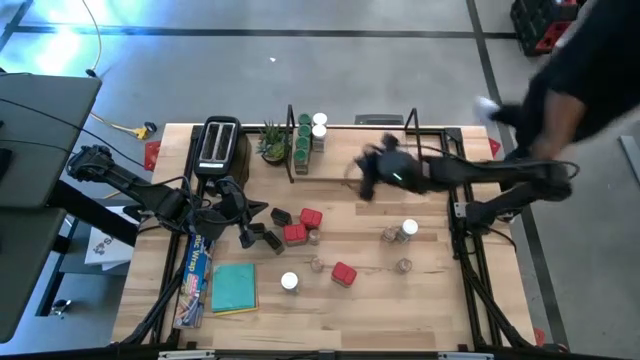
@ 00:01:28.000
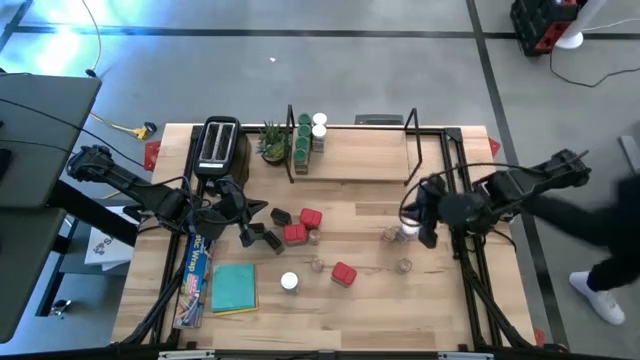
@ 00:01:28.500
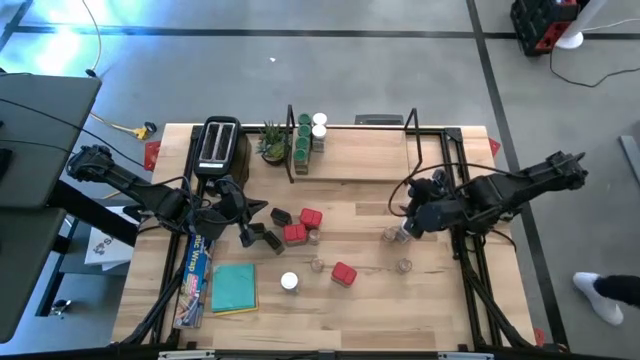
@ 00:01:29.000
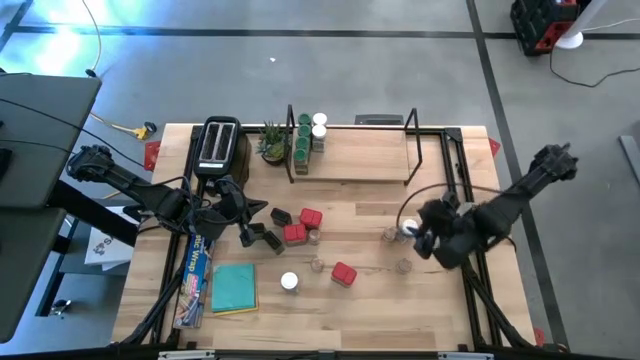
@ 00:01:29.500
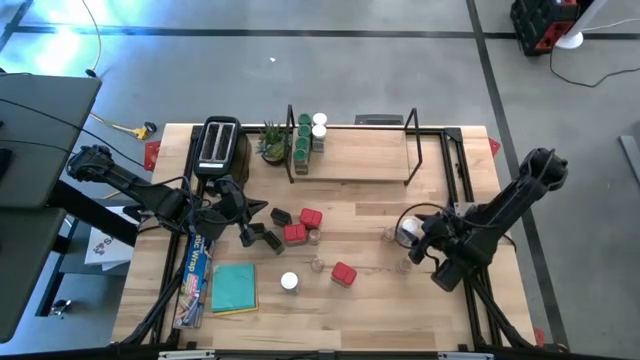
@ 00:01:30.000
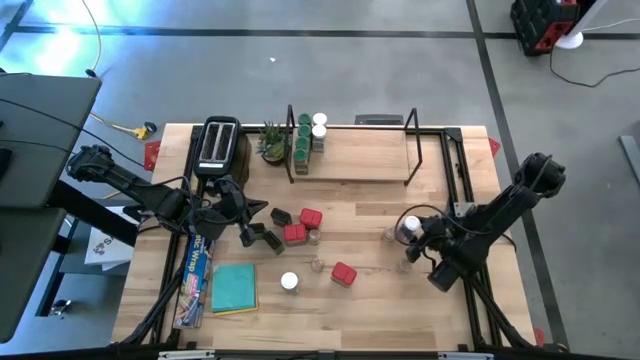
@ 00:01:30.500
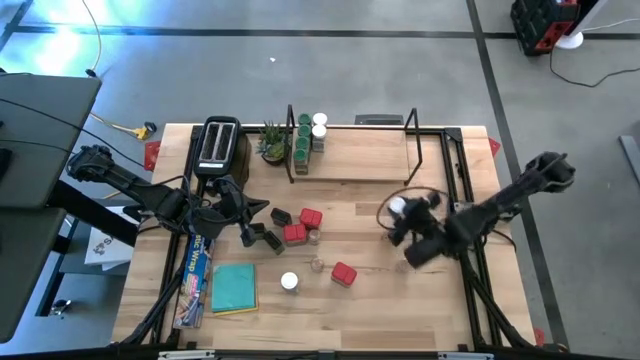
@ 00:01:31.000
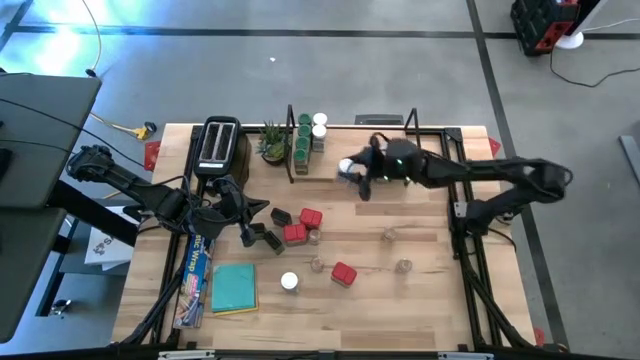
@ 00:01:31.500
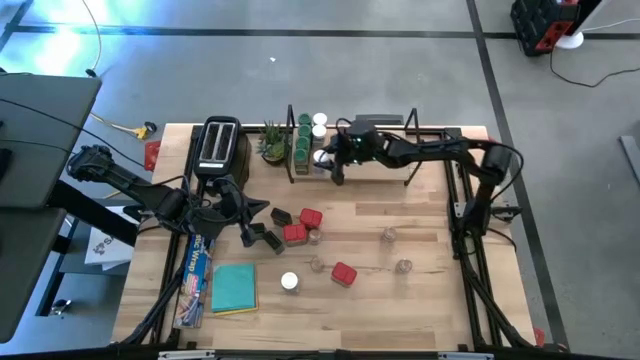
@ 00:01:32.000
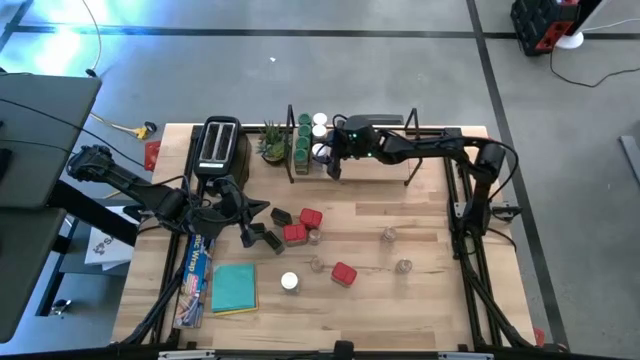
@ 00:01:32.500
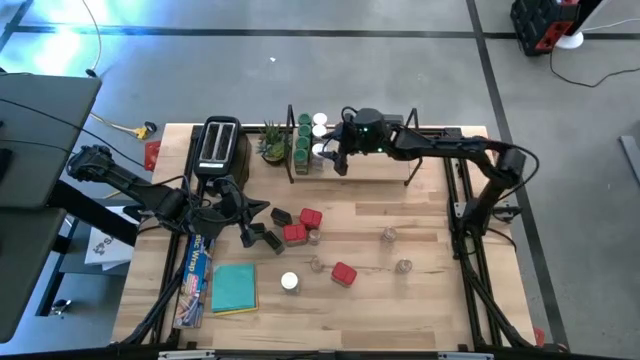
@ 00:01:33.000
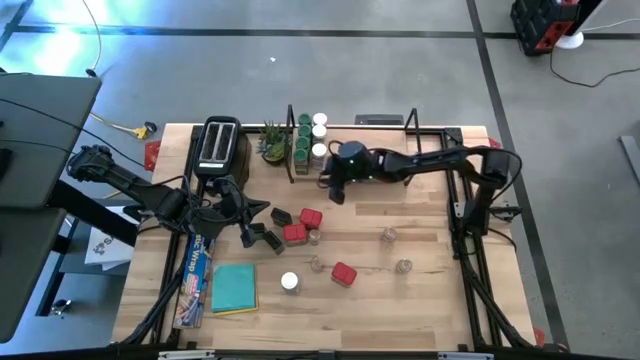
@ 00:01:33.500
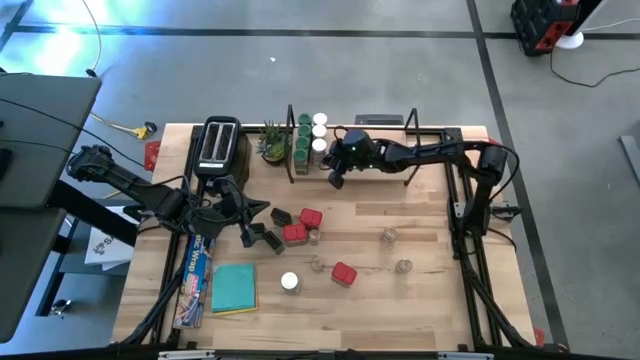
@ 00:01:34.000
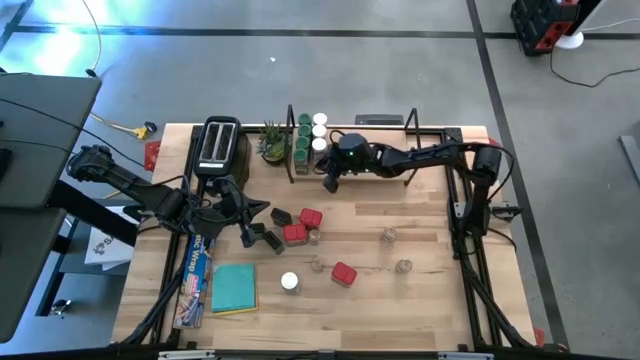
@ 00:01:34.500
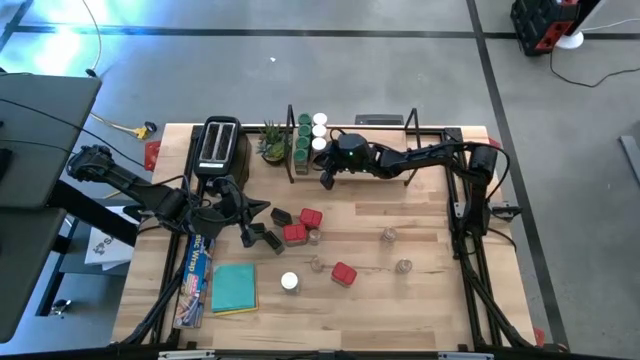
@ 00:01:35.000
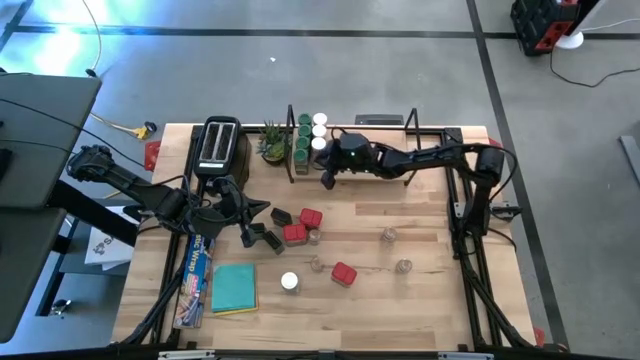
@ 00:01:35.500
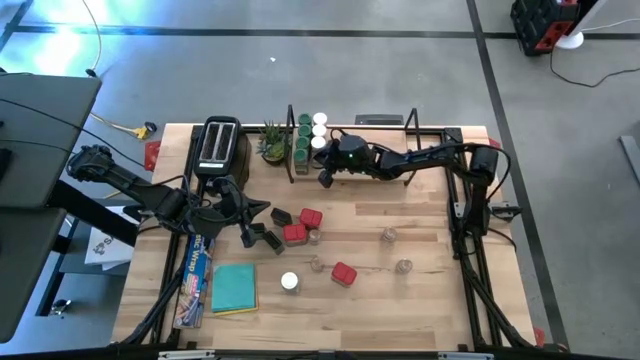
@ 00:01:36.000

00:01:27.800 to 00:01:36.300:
Task: Shelf spices
Put the top white seasoning bottle on the shelf aligned with the other white seasoning bottles

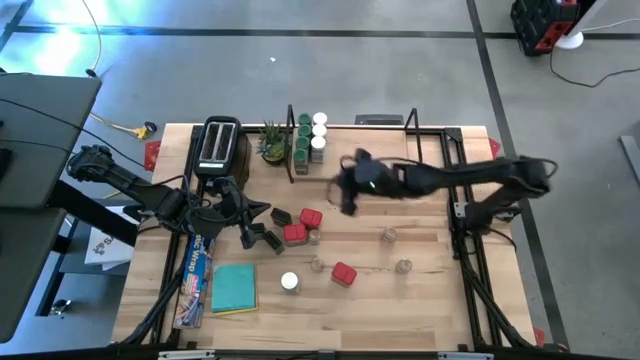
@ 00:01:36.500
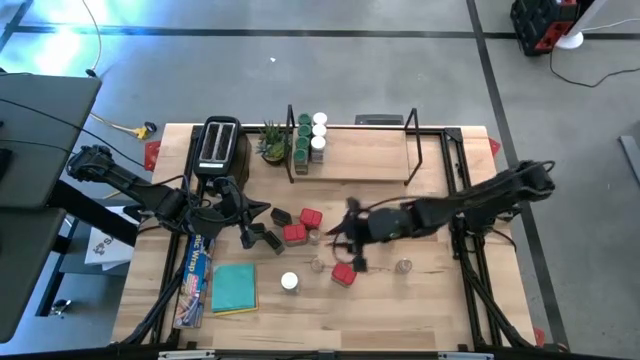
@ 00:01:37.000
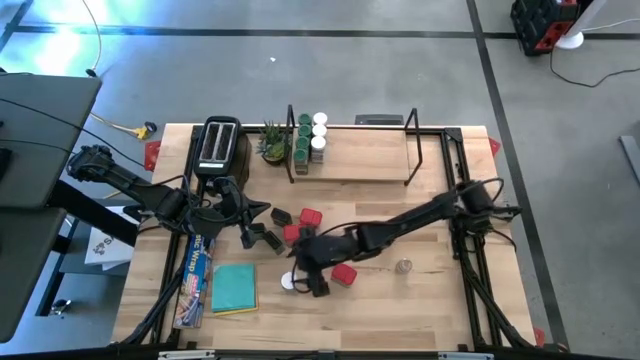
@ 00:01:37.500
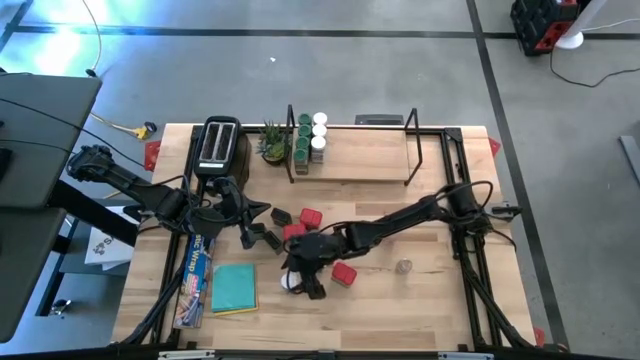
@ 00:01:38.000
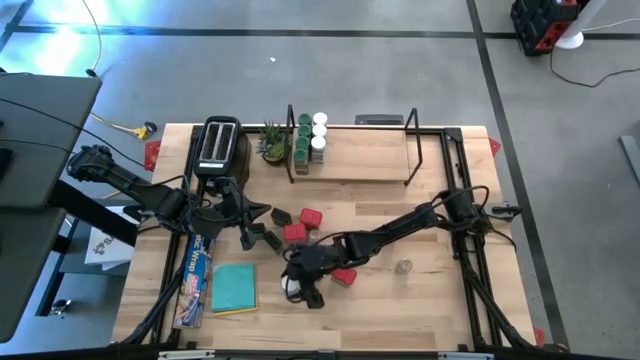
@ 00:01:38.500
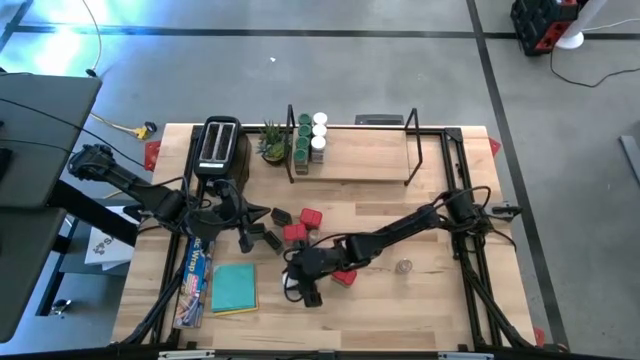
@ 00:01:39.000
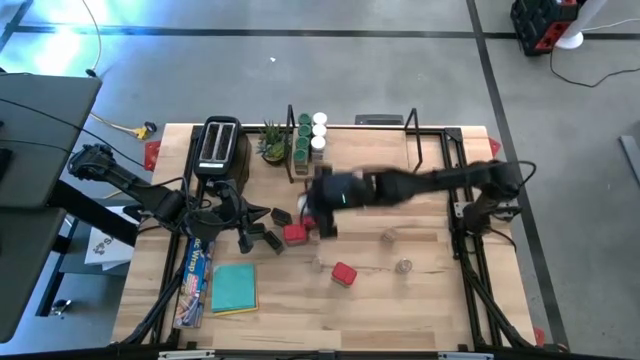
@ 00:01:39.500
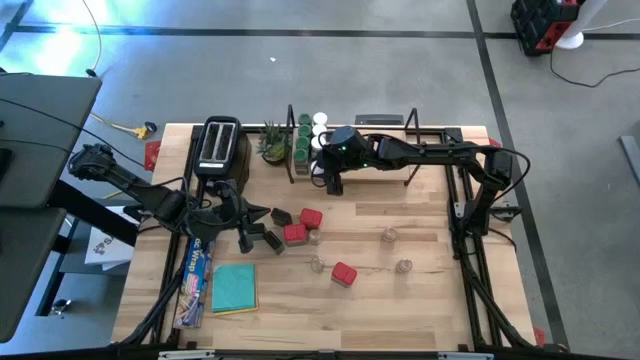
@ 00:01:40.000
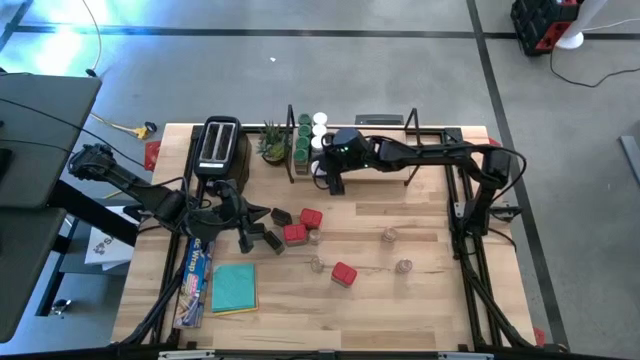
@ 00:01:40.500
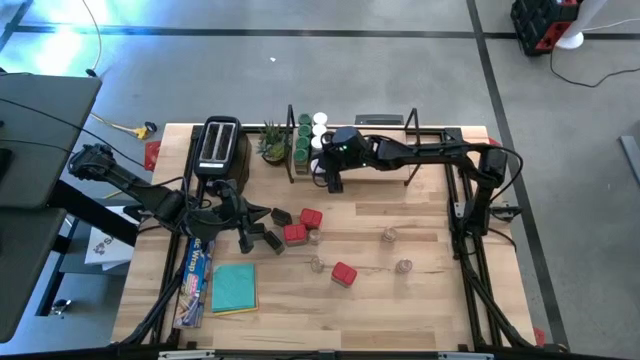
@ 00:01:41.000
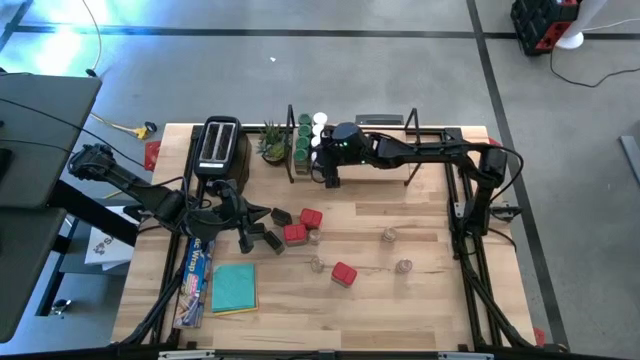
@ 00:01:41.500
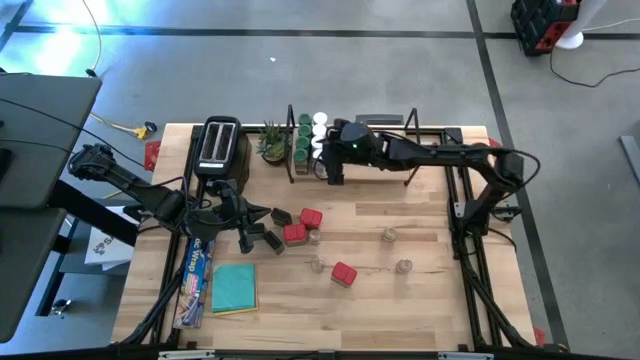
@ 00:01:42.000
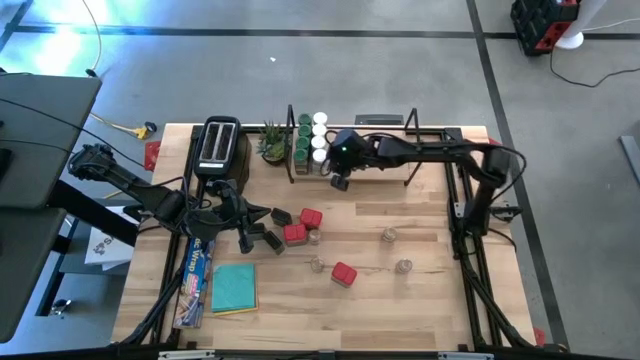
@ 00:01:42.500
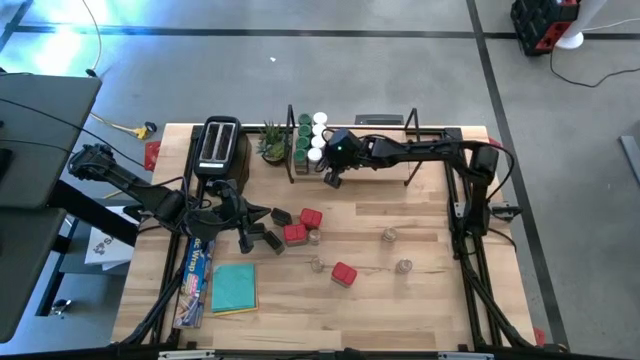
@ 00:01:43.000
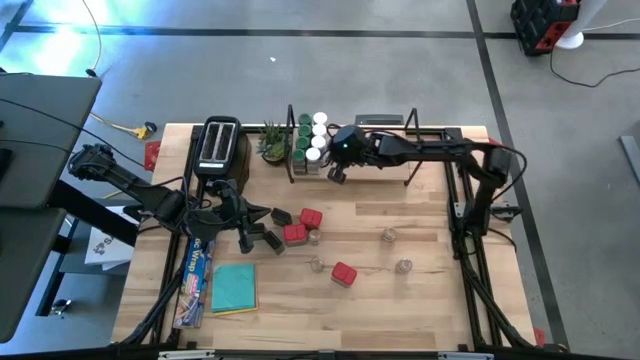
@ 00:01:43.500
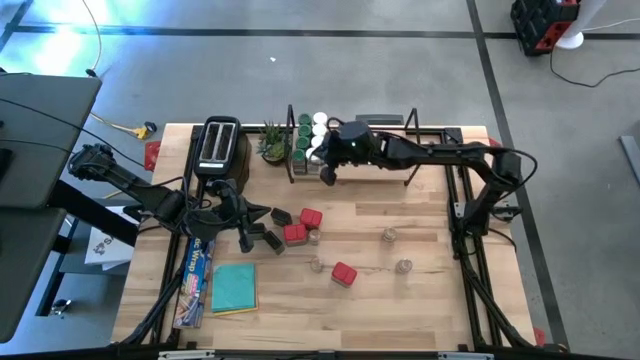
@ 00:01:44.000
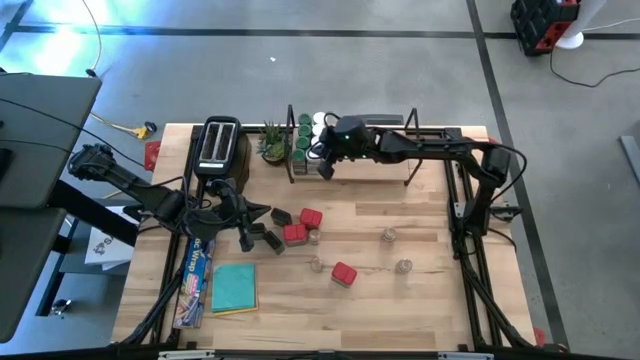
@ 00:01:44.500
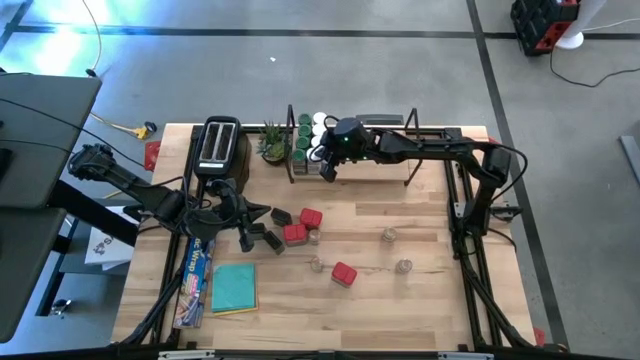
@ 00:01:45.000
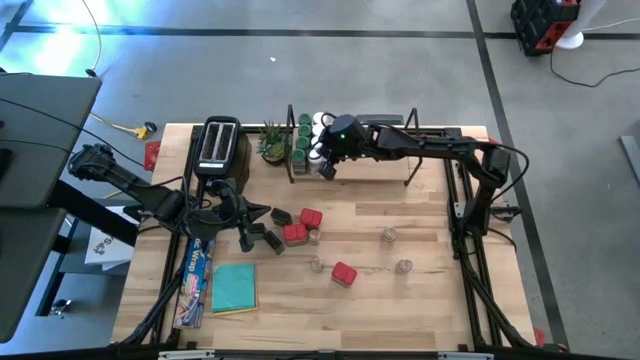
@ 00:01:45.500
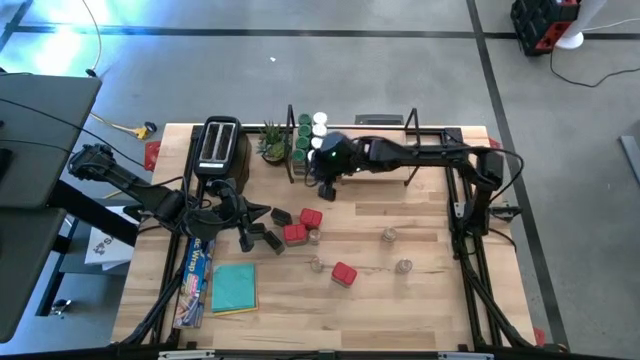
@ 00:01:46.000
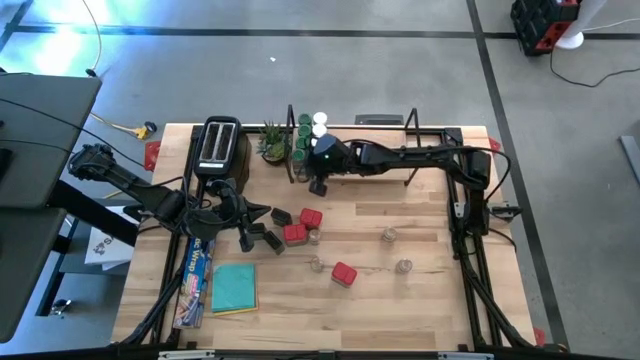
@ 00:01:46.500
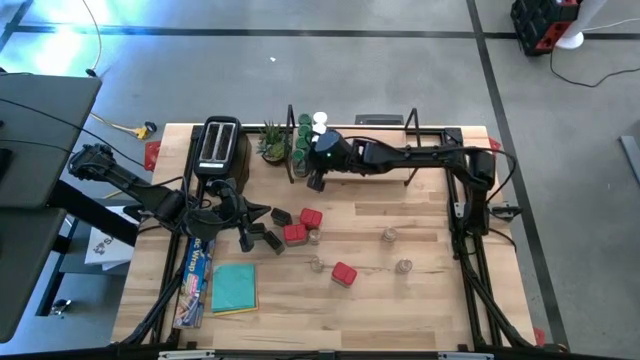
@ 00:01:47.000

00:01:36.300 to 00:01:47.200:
Put the white seasoning bottle on the shelf aligned with the other white seasoning bottles
